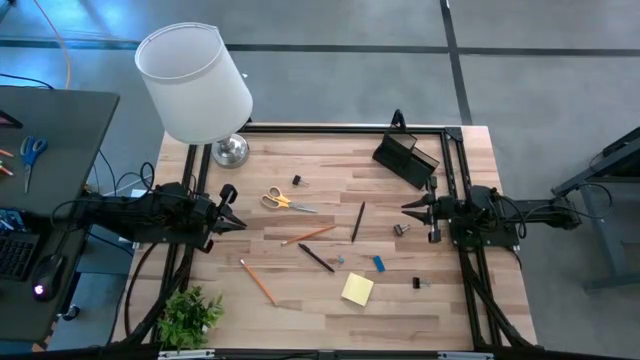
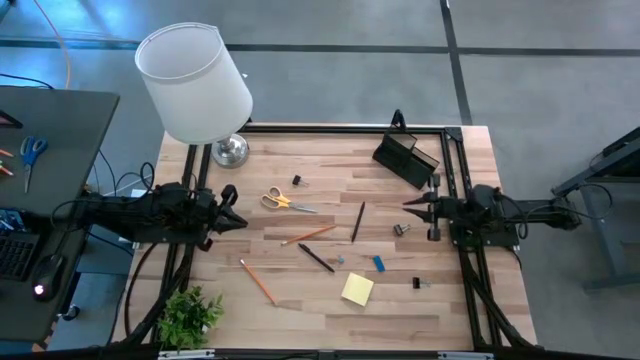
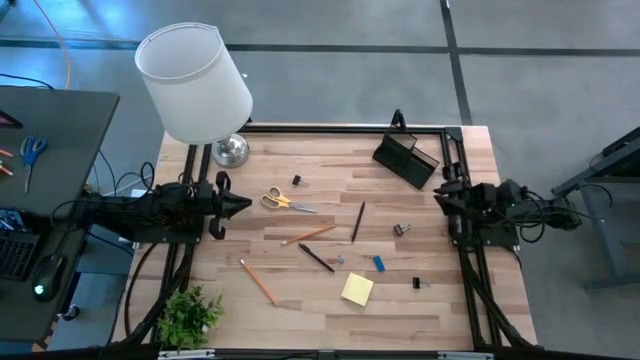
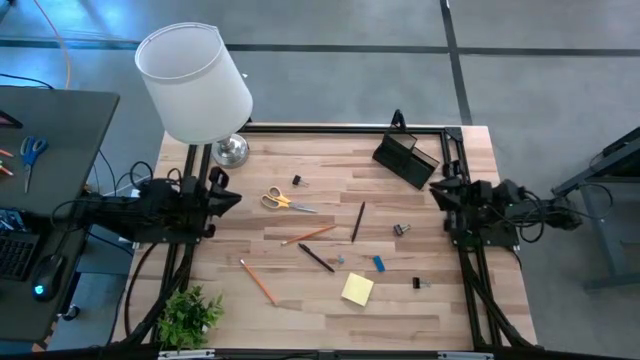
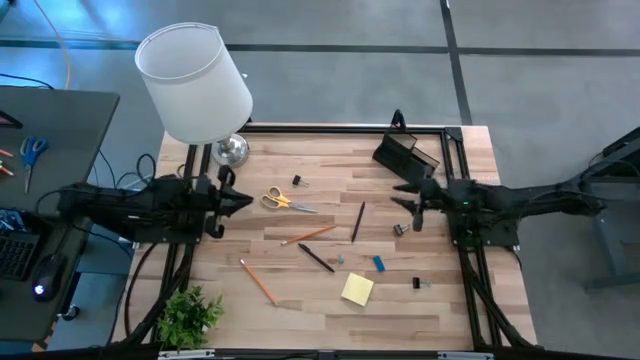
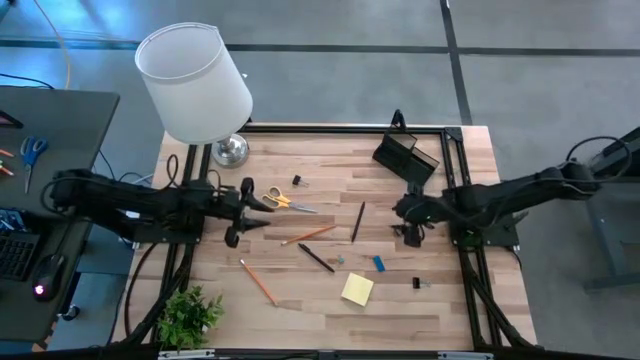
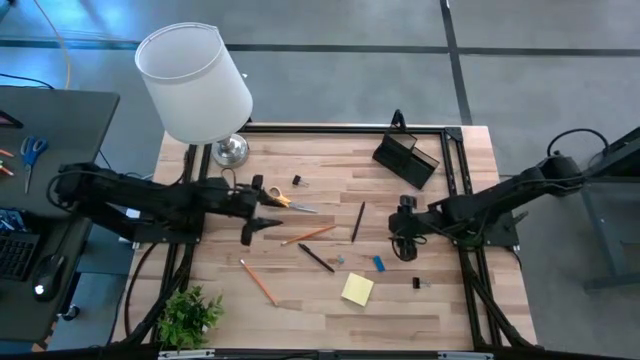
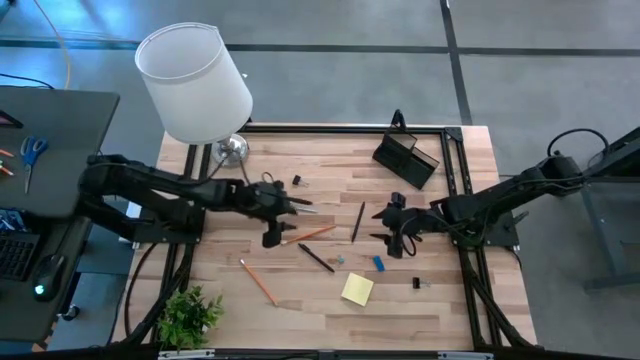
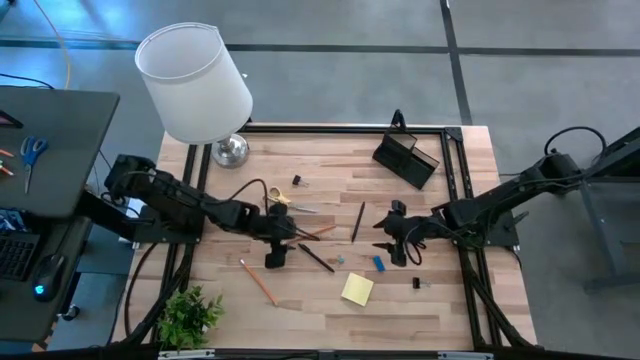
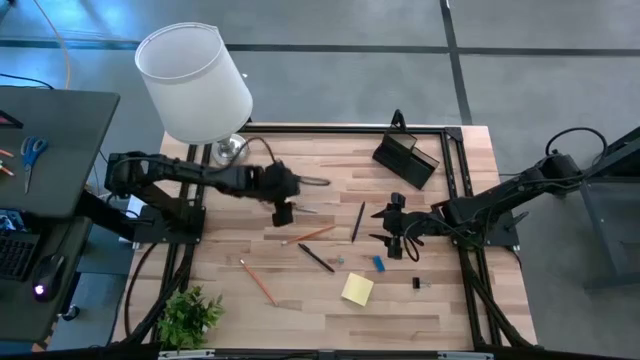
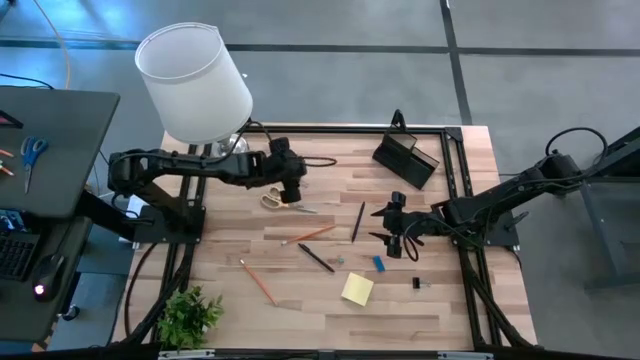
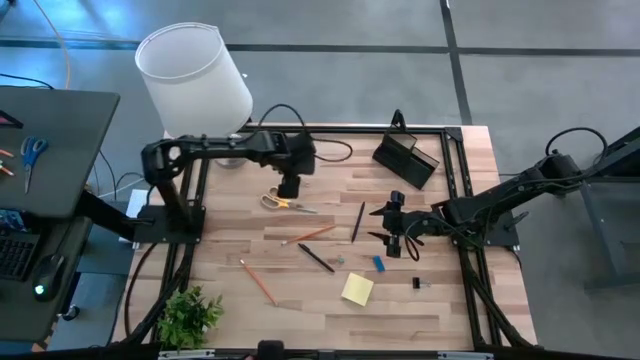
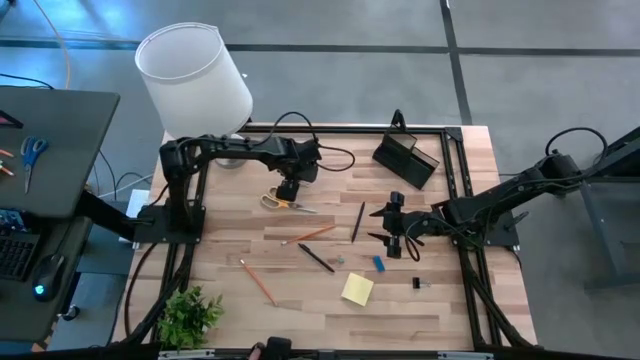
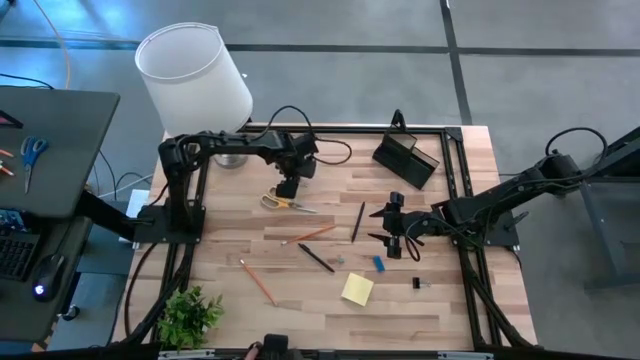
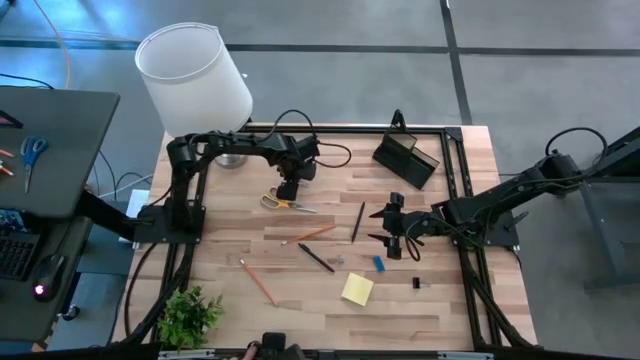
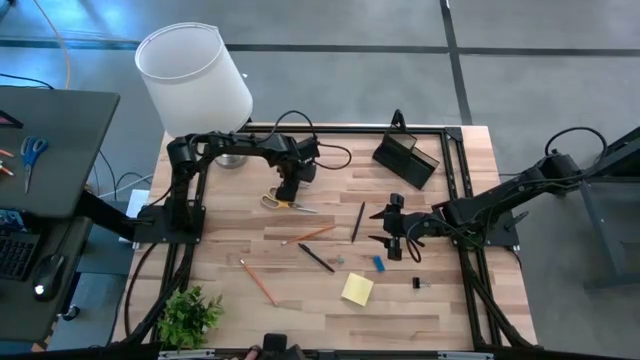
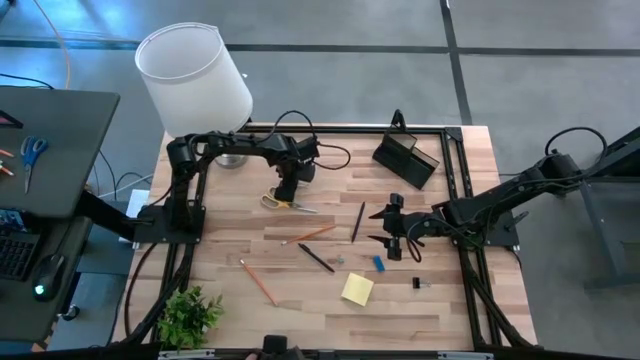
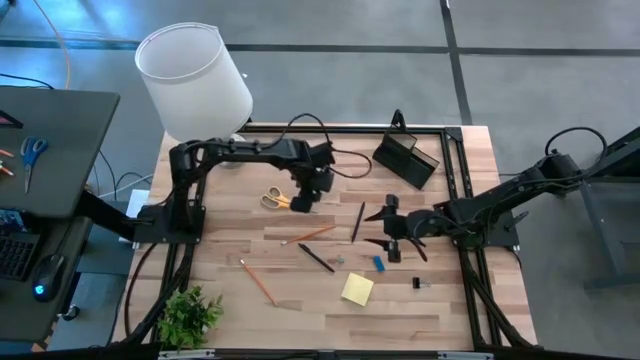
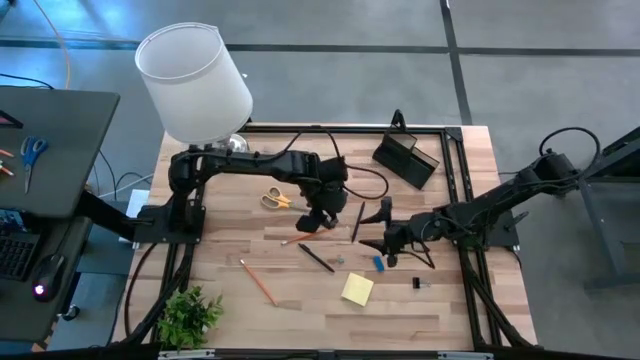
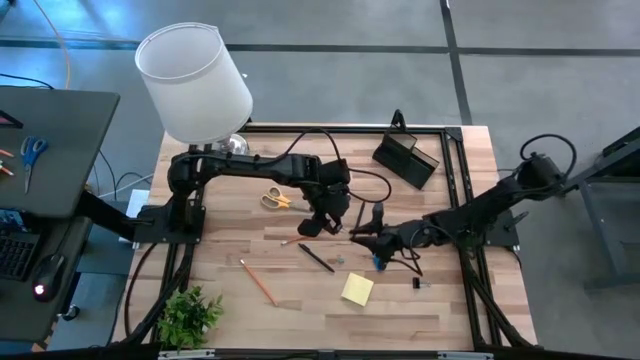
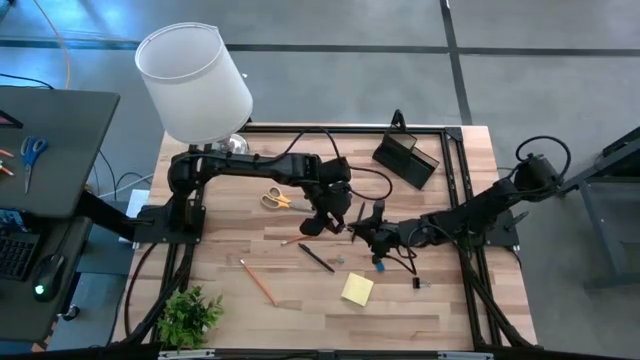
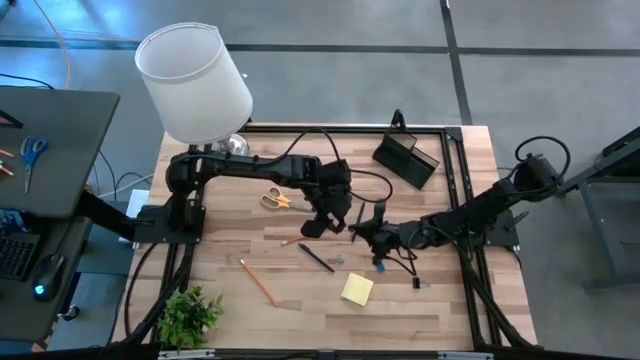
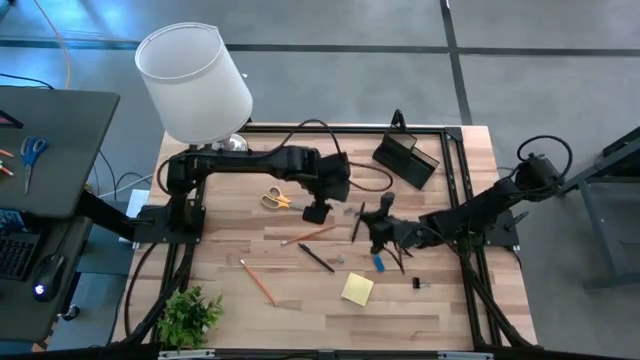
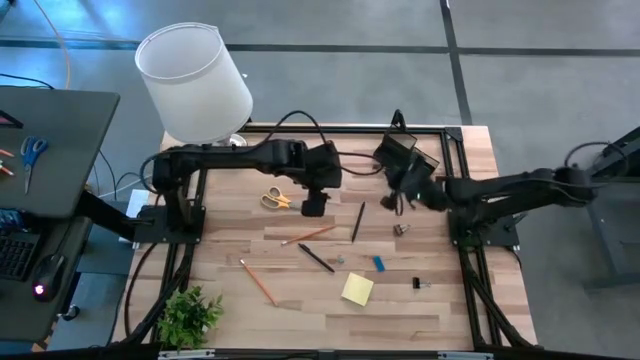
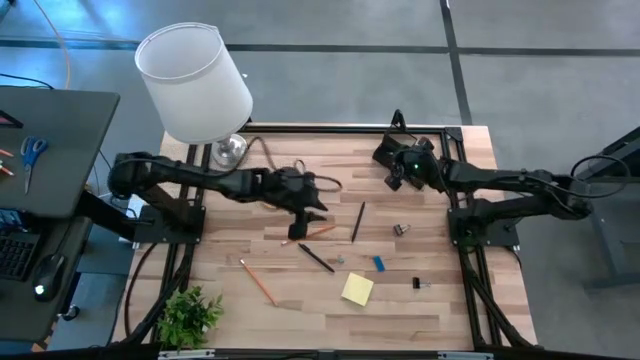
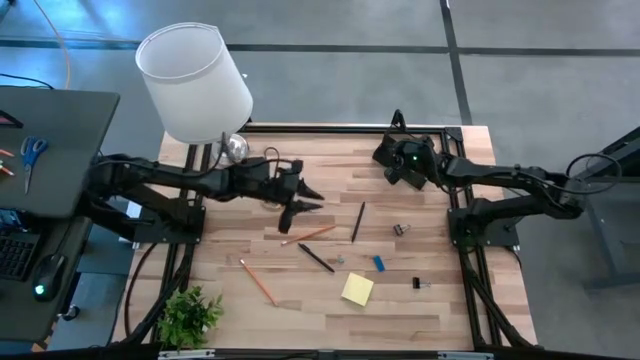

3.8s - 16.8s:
Task: Pick and place office supplies into organizer
Put the top black binder clip into the mesh desk organizer

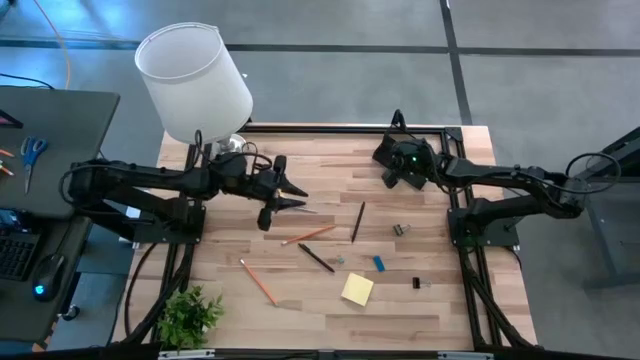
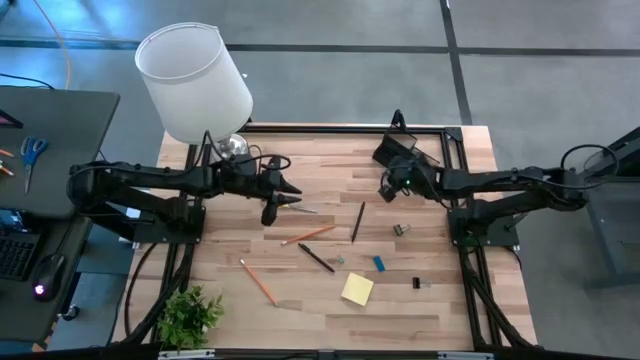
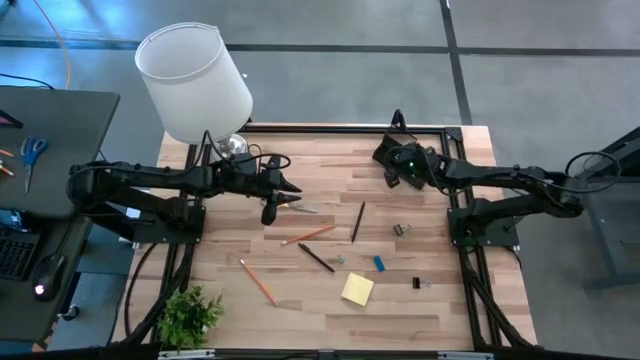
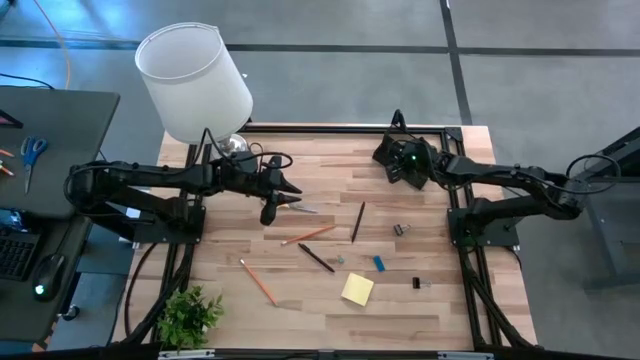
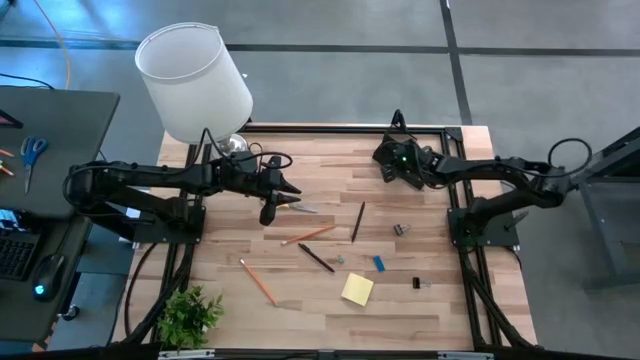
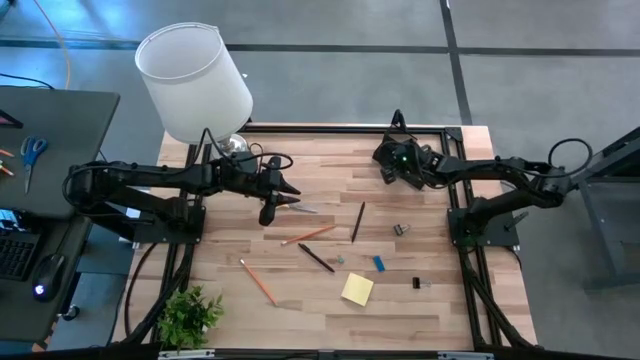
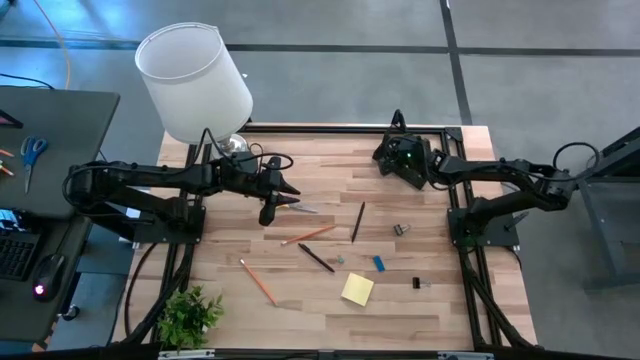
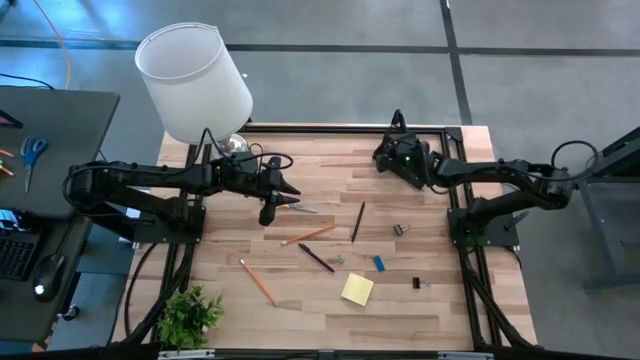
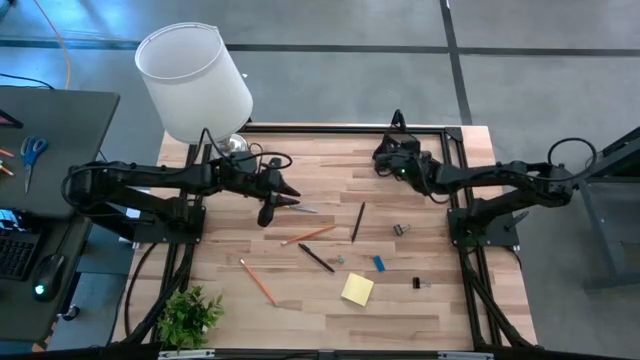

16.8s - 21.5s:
Put the top black binder clip into the mesh desk organizer

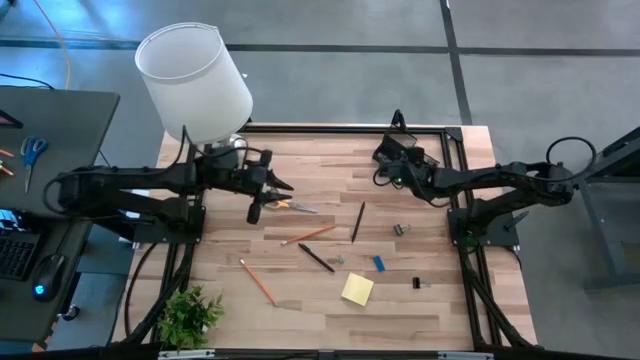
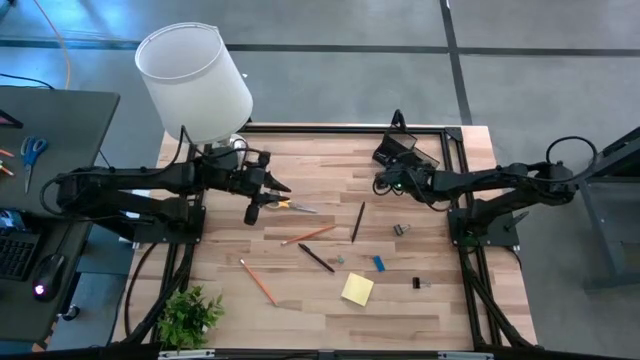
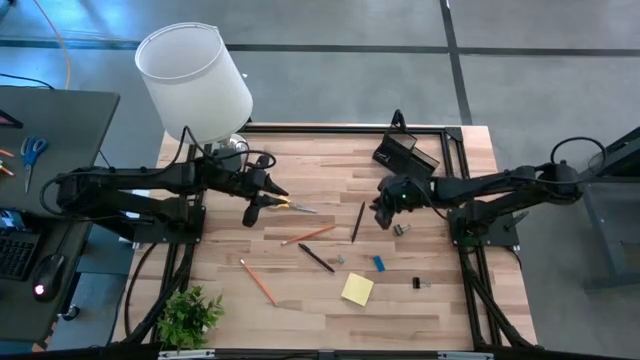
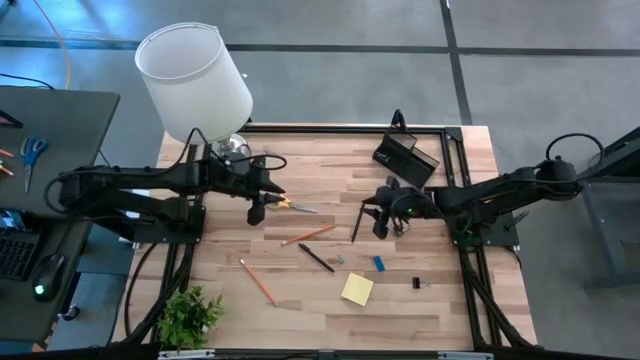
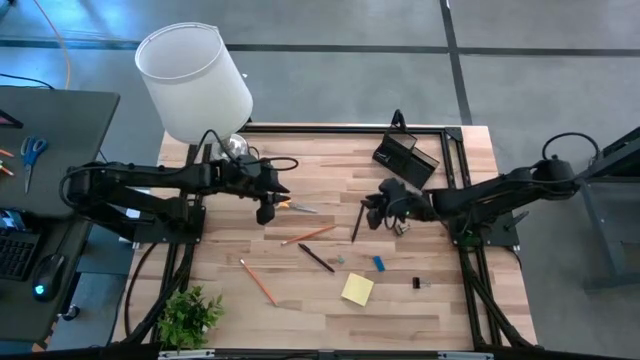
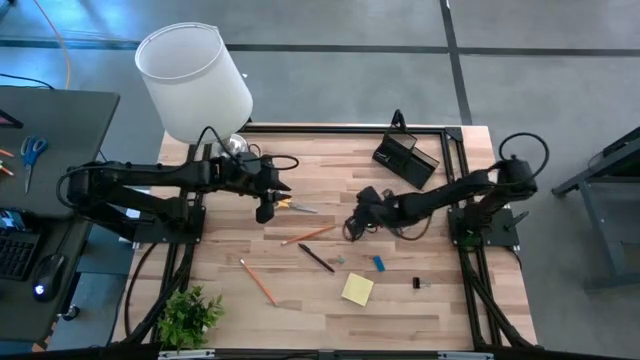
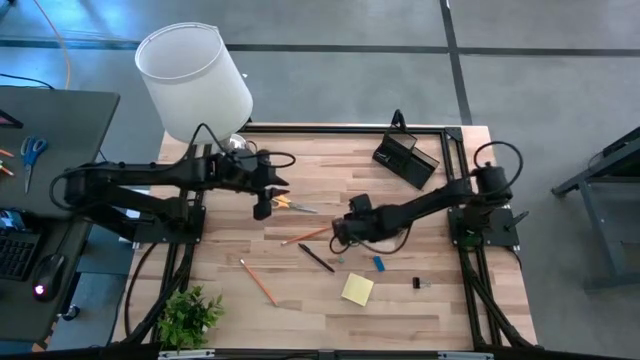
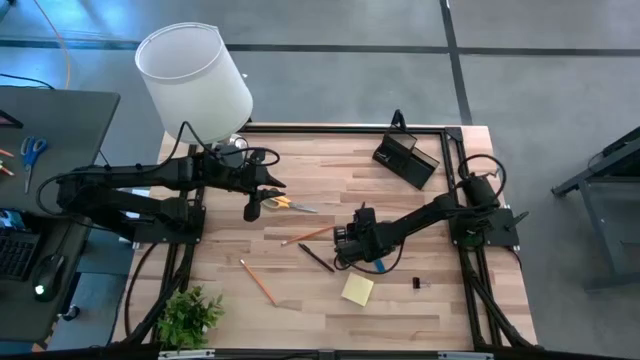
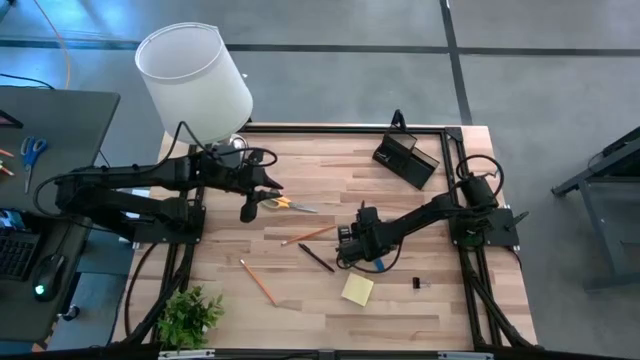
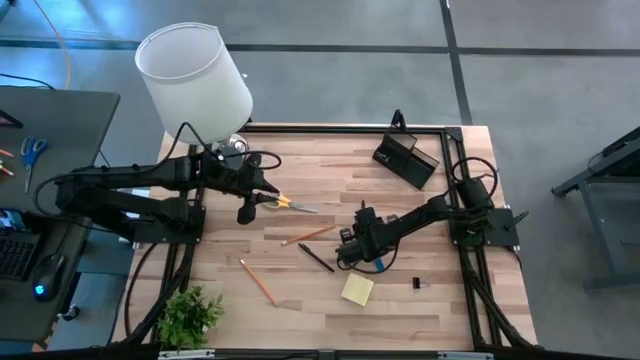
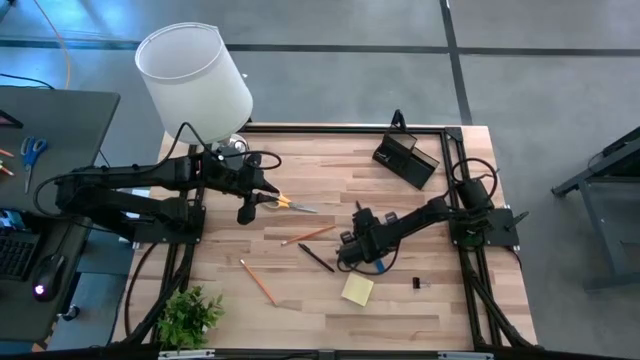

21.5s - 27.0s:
Put the top black pen into the mesh desk organizer
